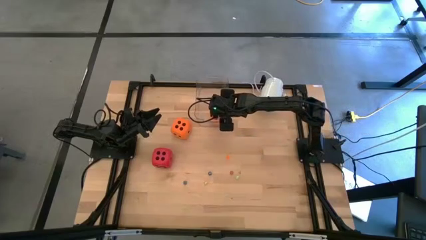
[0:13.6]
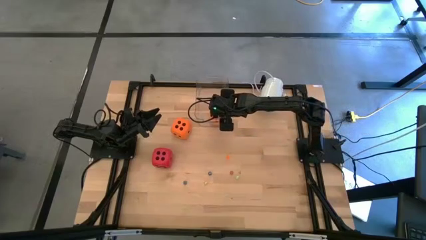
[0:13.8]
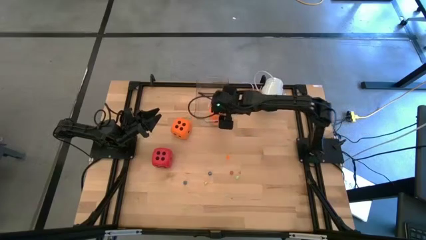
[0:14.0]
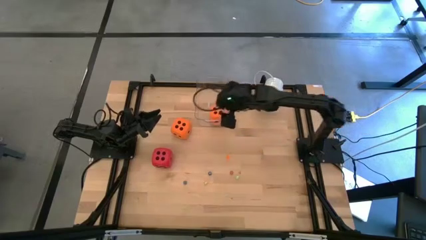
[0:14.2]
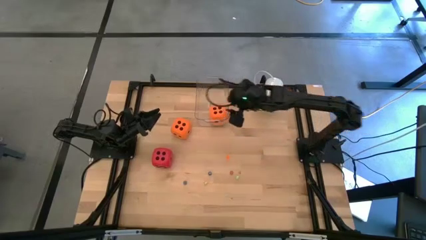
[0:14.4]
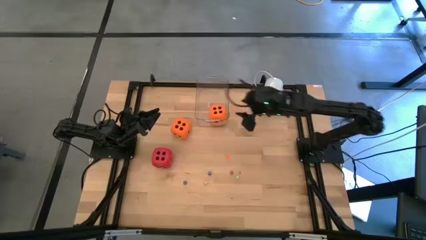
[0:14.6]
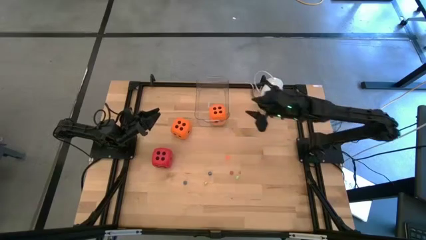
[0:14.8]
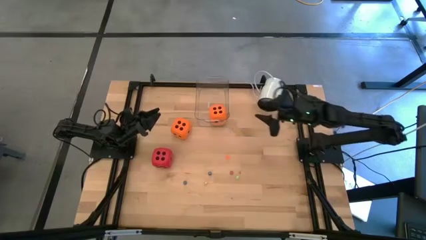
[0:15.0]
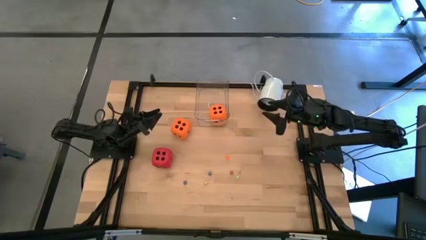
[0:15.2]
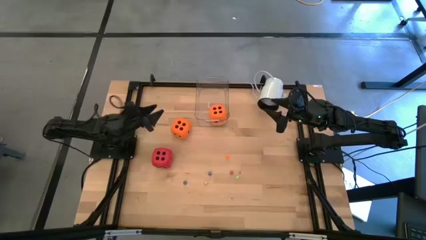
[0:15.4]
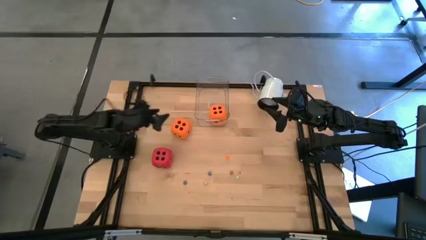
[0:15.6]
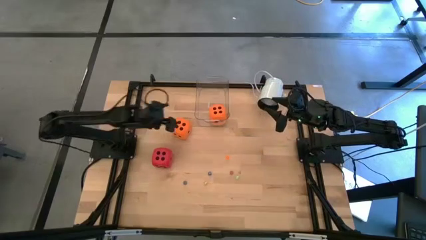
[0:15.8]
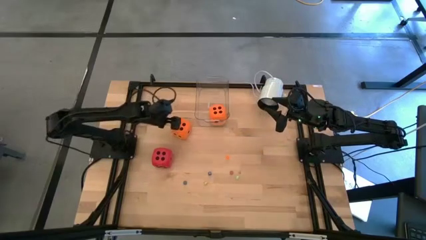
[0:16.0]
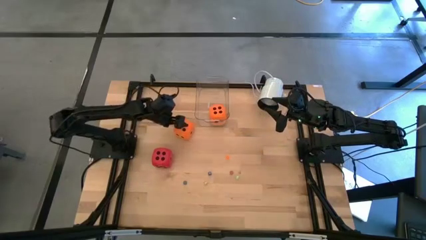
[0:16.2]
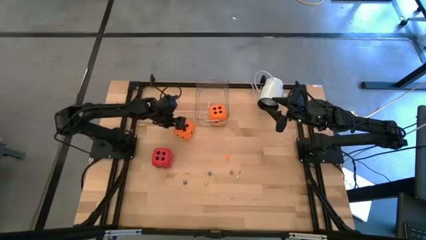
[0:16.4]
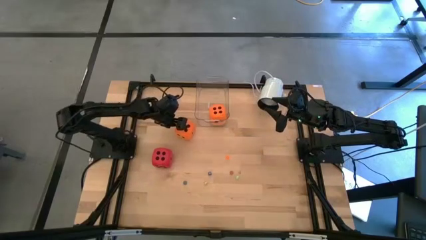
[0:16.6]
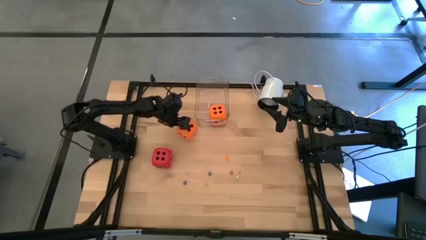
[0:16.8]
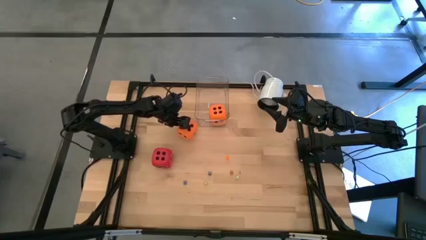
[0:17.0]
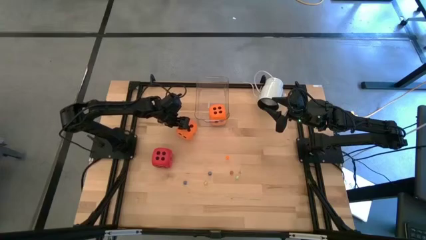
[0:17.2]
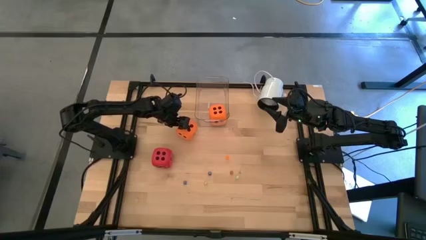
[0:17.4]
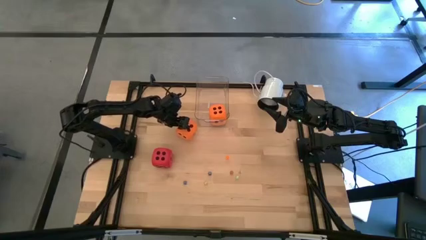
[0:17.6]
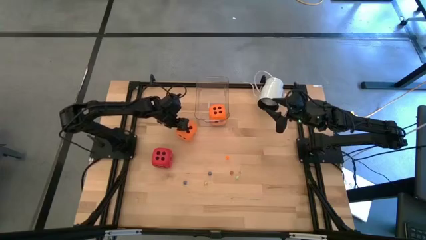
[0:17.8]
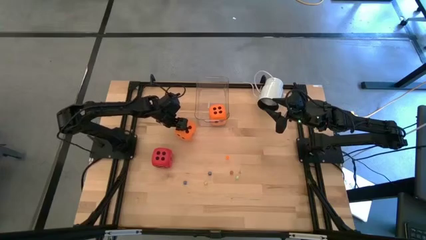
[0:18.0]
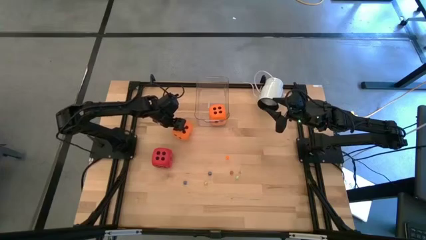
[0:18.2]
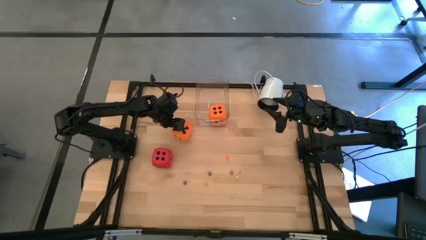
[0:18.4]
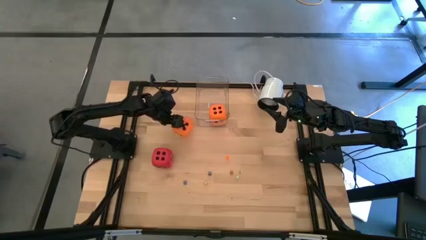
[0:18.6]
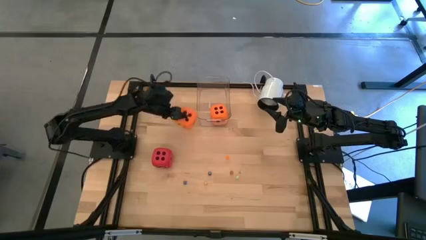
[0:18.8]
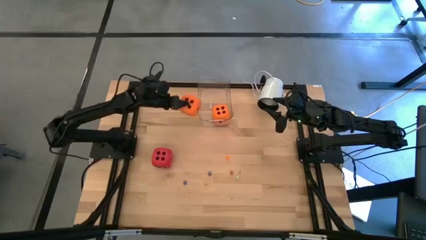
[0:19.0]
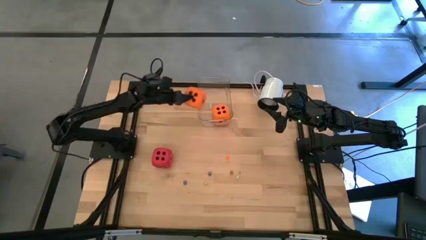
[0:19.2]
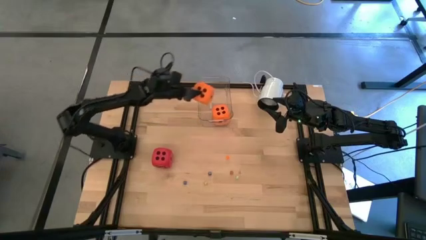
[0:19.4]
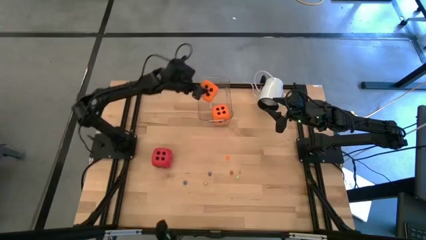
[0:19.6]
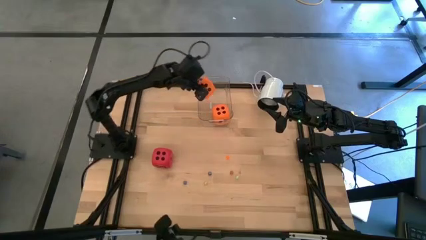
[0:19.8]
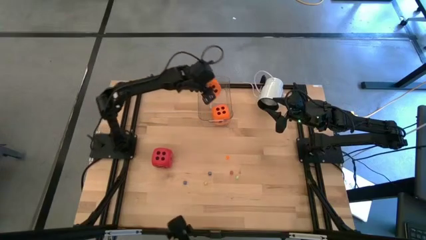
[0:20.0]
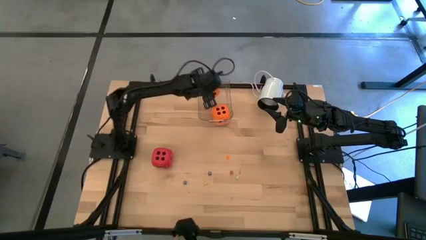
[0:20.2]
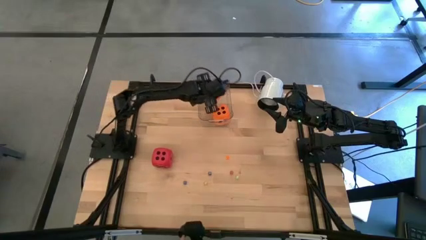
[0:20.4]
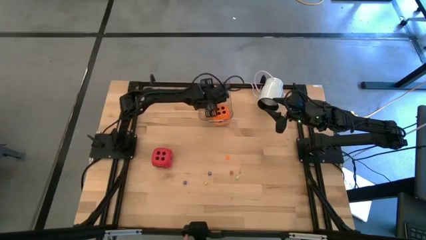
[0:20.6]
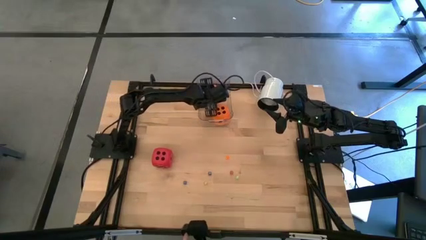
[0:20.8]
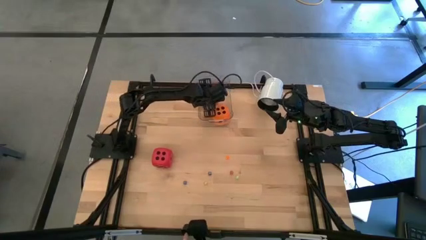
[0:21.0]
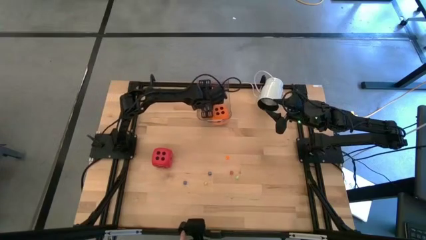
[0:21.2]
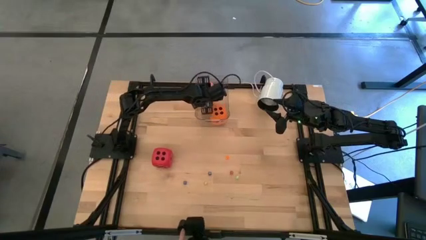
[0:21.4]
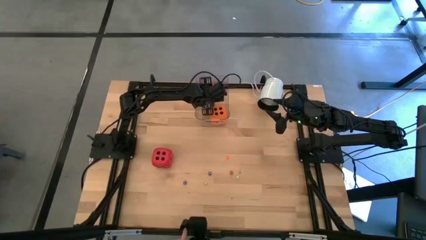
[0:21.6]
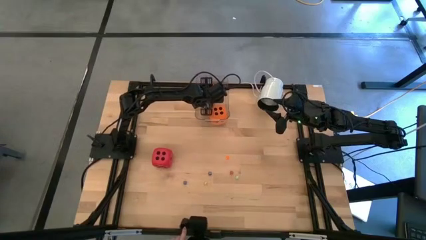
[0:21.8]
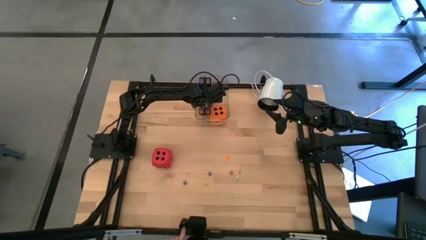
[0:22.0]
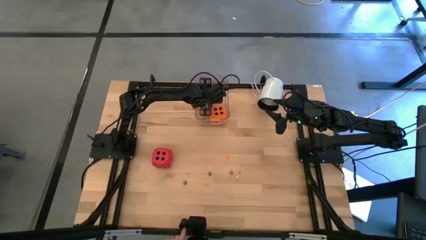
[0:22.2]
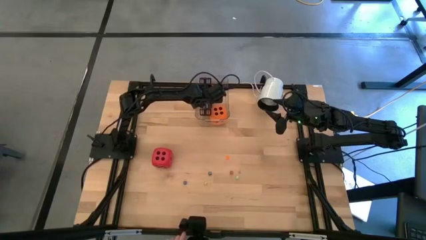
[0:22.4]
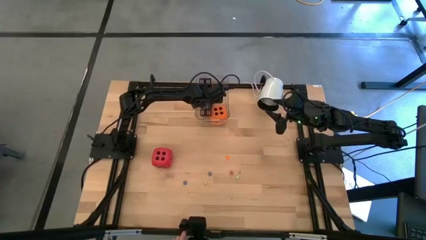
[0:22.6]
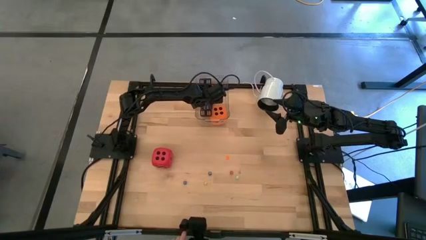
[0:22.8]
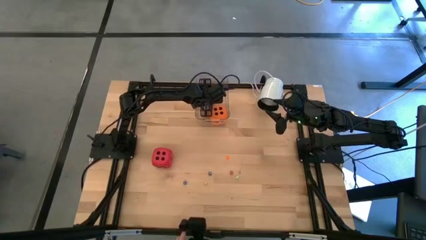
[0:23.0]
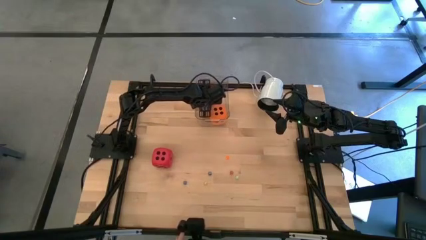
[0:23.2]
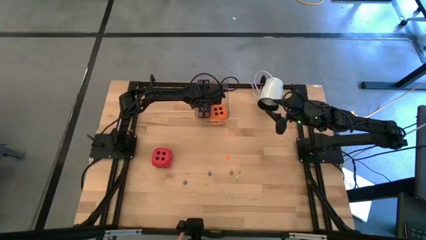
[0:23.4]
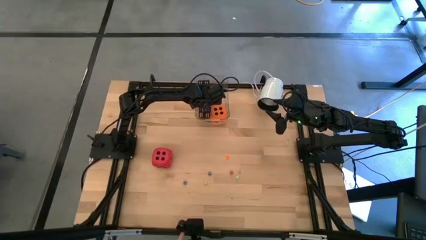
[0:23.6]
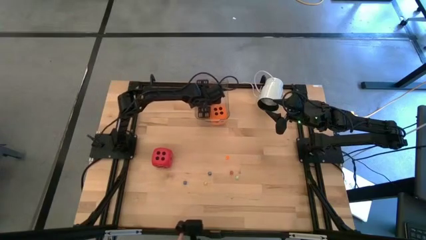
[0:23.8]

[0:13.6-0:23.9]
Task: Pick & Place Dice
Put the large orange die into the bin

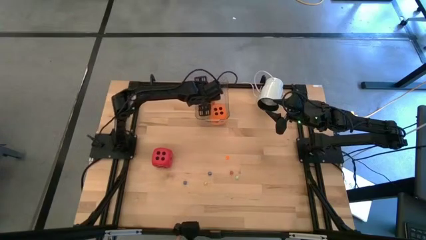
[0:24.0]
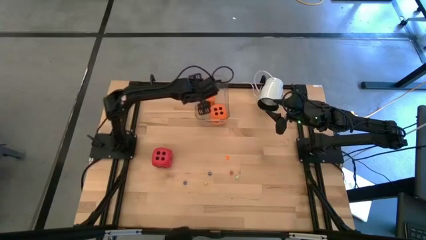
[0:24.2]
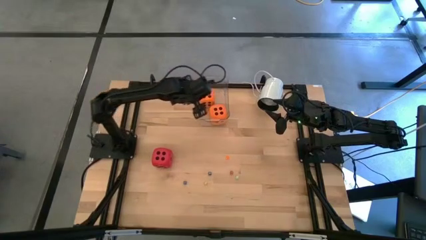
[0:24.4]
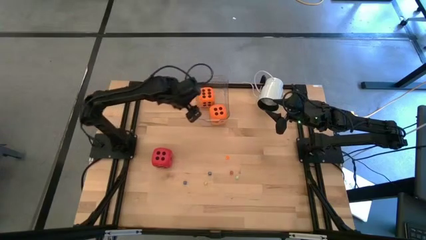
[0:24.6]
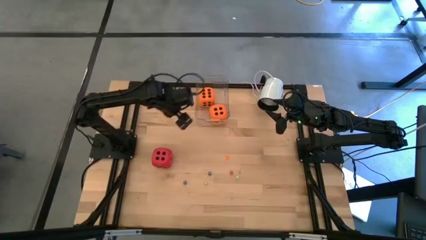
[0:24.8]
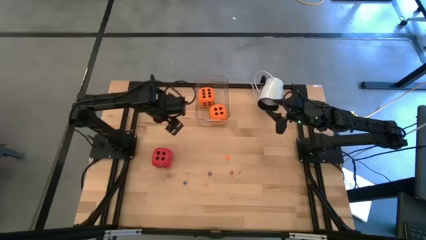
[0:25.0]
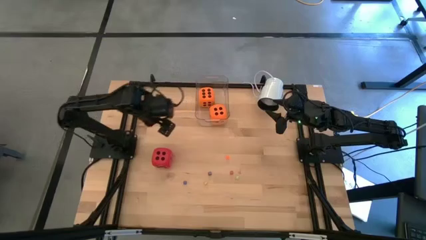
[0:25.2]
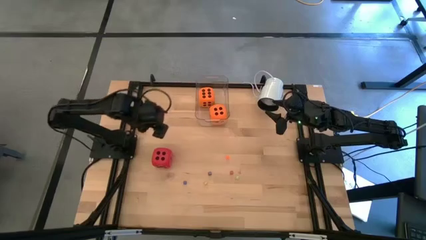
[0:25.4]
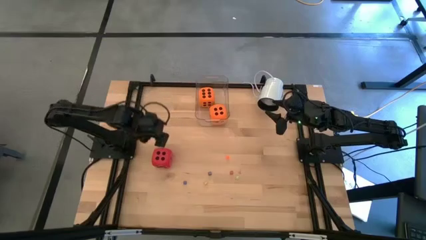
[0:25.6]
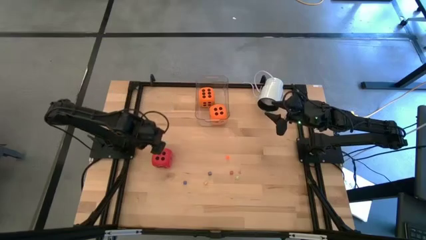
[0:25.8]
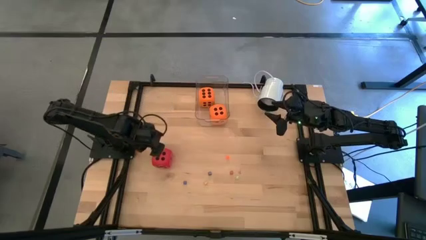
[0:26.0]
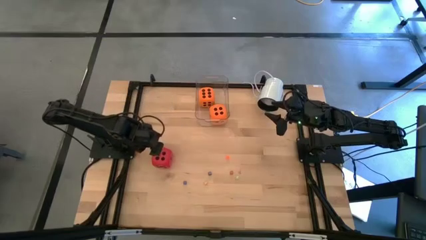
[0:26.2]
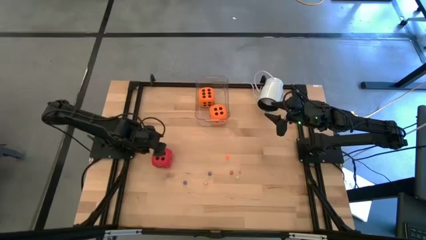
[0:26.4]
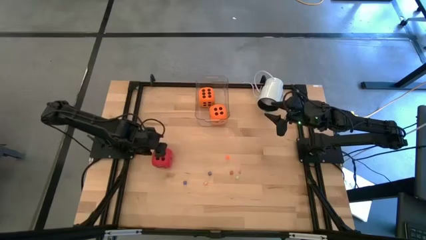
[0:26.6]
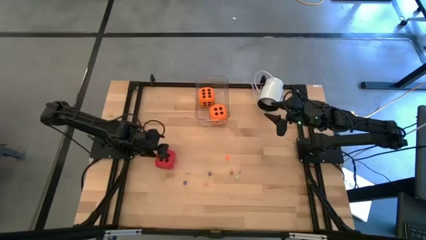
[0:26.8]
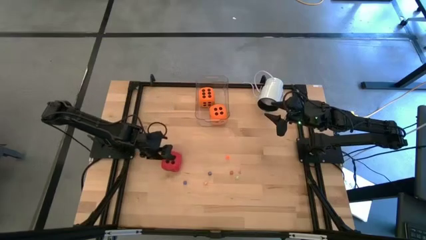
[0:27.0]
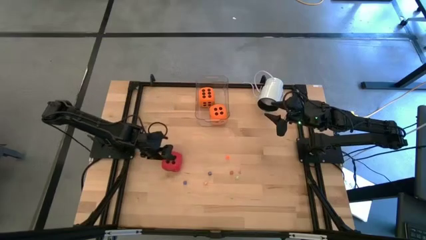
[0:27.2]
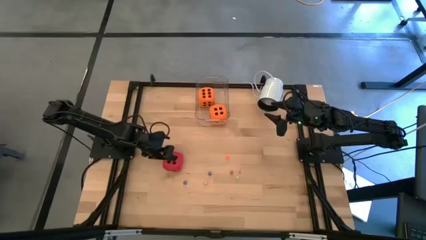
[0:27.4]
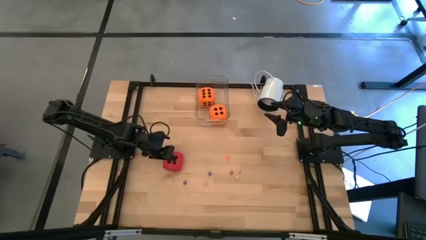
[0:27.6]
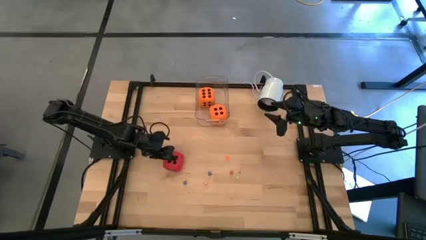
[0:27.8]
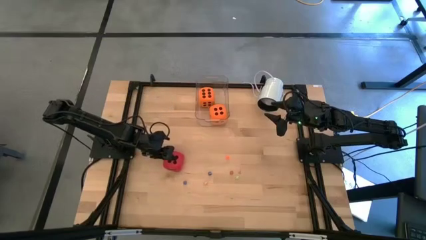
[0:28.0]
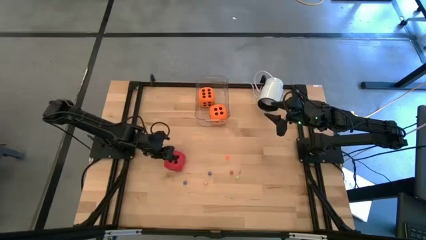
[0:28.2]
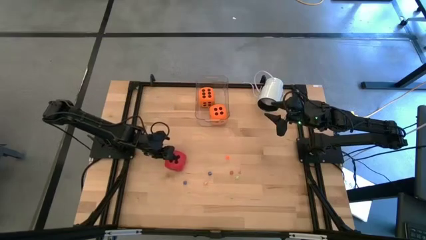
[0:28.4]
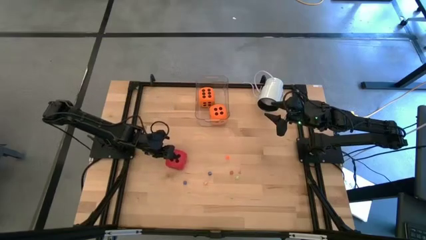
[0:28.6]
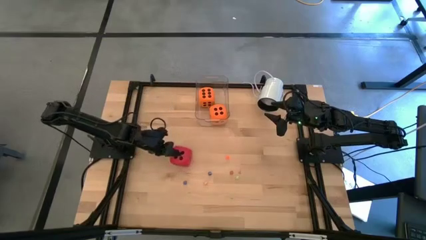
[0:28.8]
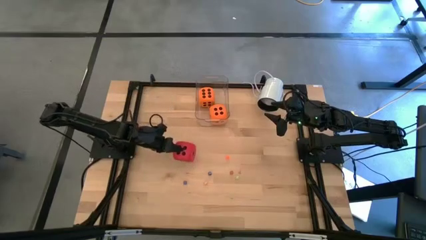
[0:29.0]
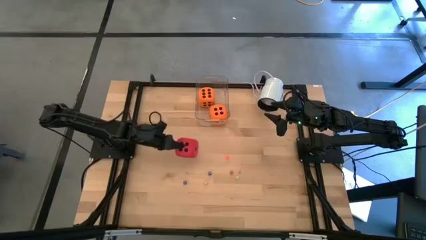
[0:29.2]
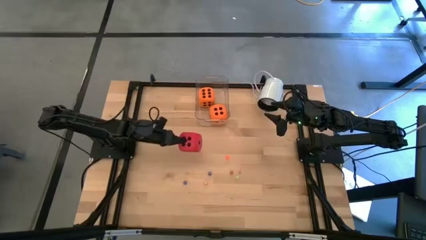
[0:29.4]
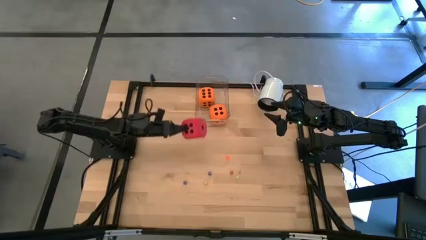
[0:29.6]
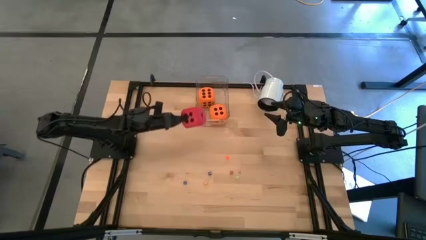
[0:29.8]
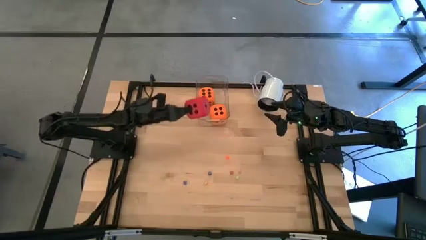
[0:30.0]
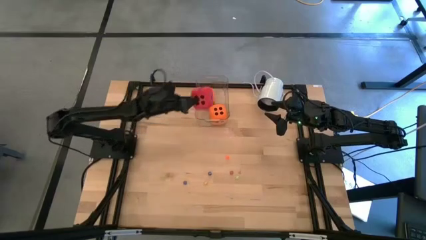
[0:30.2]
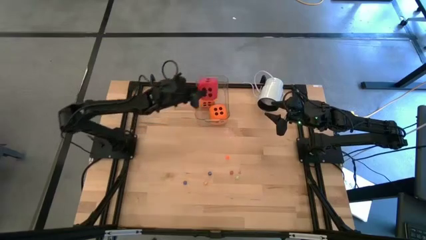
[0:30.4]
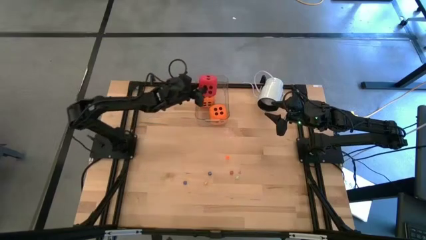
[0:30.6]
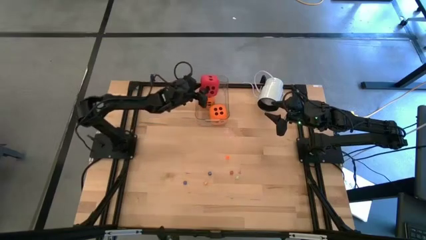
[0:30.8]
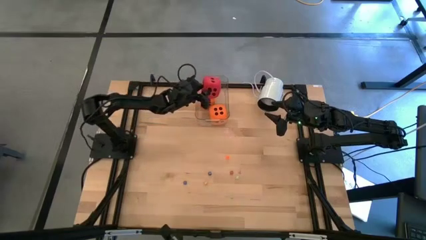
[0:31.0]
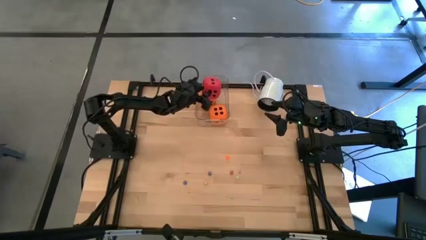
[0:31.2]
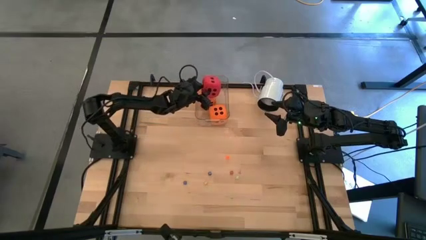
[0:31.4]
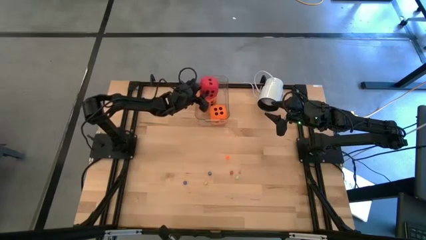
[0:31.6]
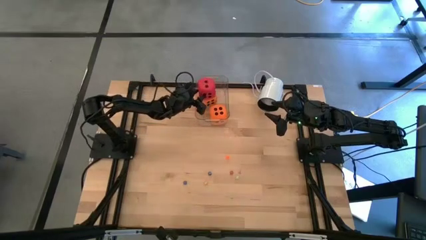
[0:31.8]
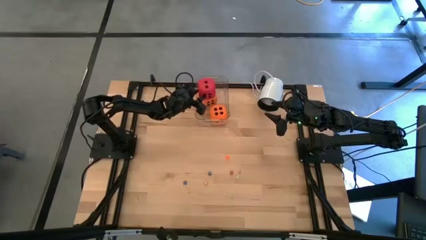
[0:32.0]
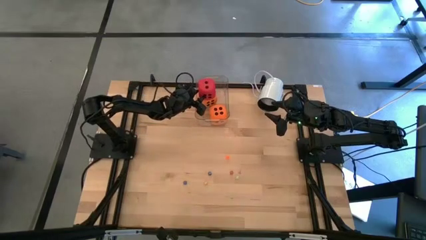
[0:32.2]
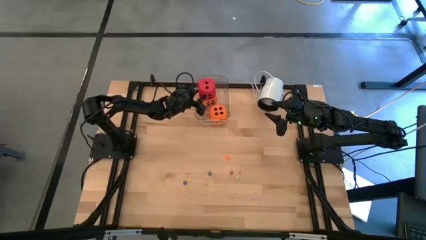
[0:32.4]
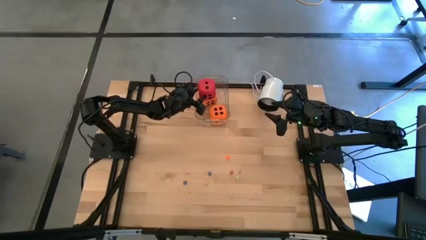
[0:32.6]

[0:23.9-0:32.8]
Put the large red die in the bin
